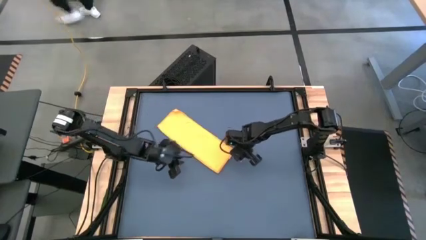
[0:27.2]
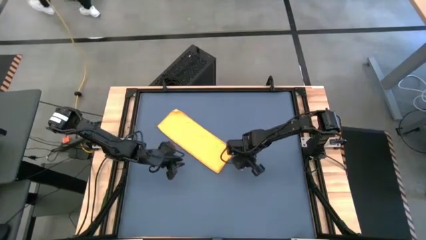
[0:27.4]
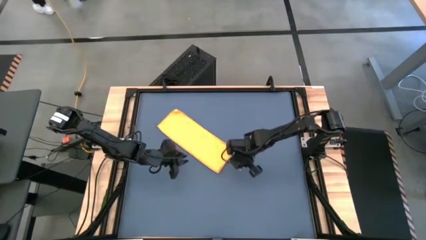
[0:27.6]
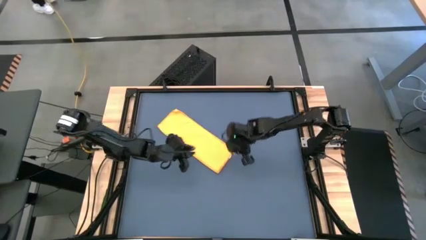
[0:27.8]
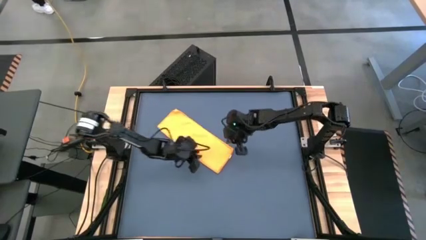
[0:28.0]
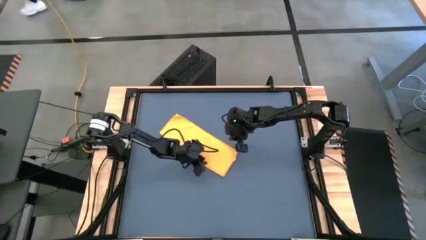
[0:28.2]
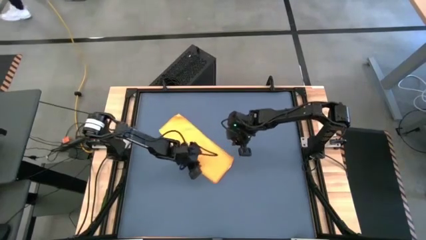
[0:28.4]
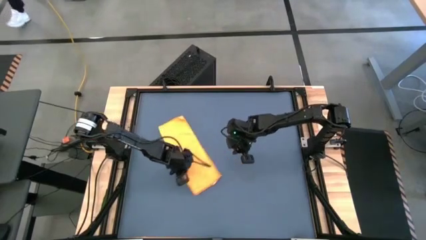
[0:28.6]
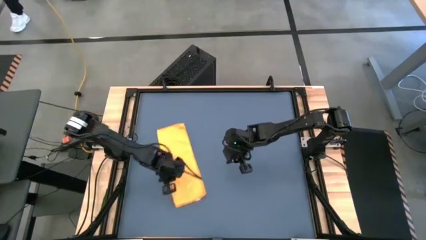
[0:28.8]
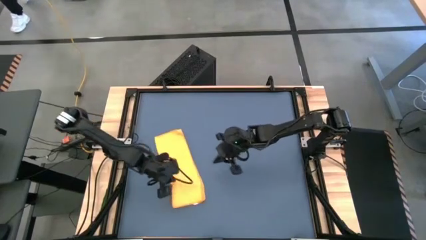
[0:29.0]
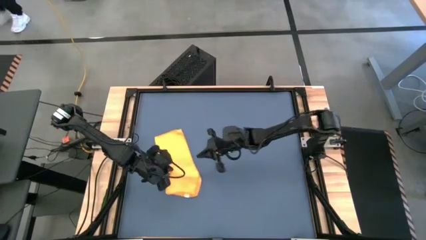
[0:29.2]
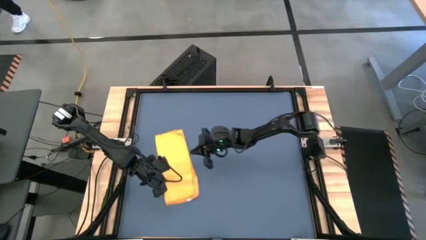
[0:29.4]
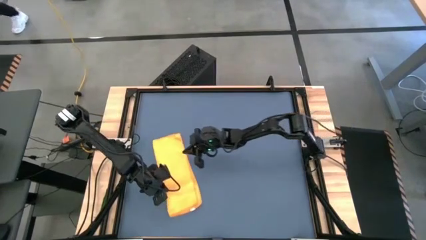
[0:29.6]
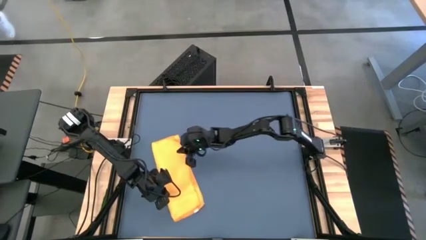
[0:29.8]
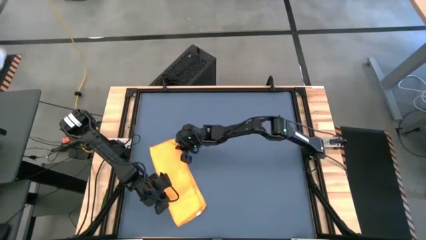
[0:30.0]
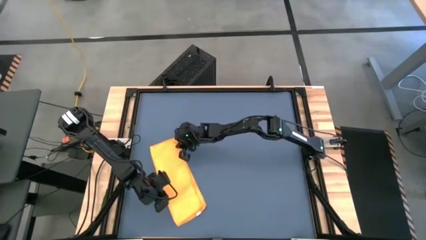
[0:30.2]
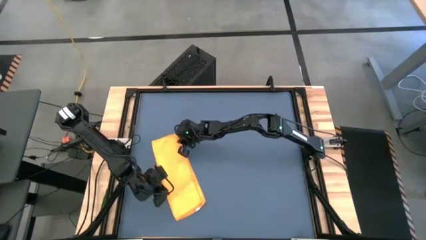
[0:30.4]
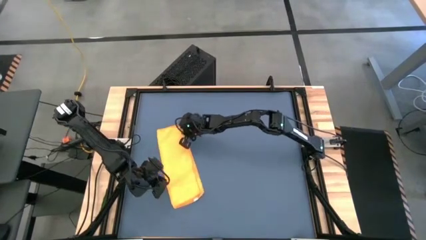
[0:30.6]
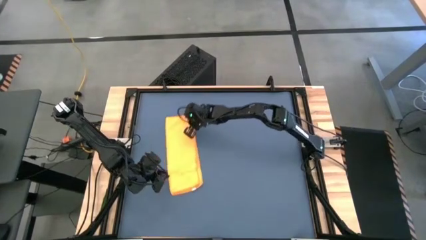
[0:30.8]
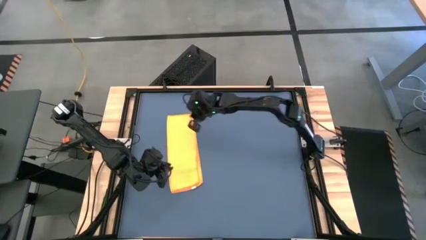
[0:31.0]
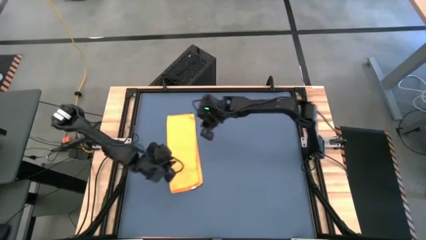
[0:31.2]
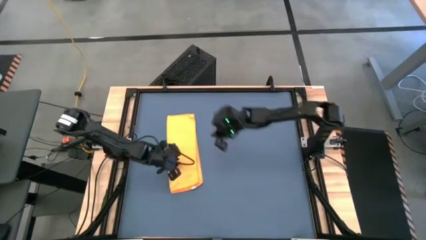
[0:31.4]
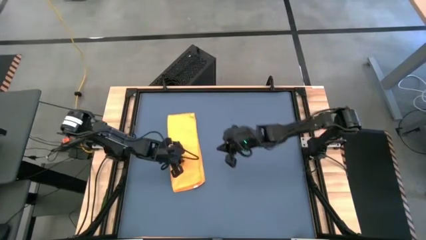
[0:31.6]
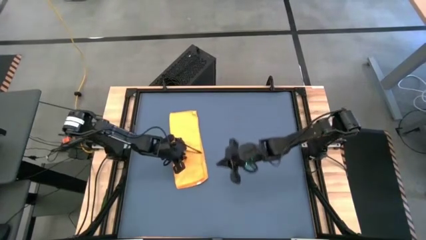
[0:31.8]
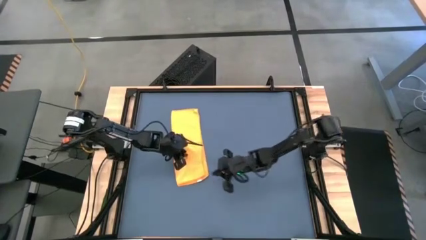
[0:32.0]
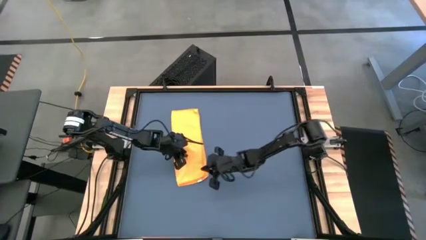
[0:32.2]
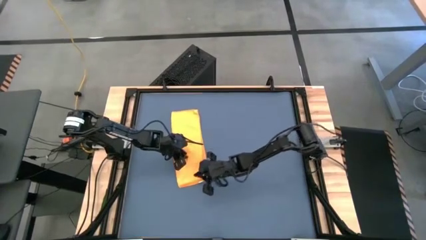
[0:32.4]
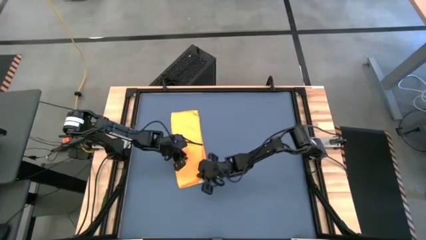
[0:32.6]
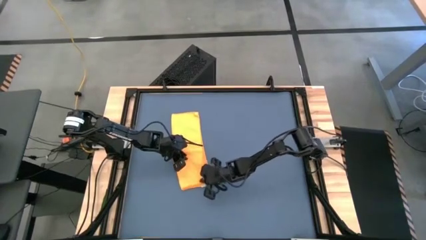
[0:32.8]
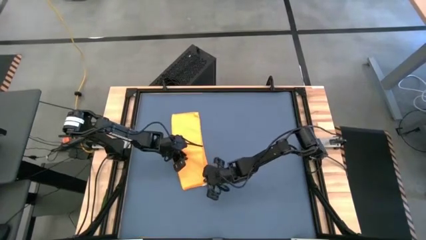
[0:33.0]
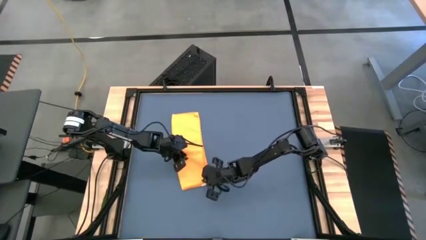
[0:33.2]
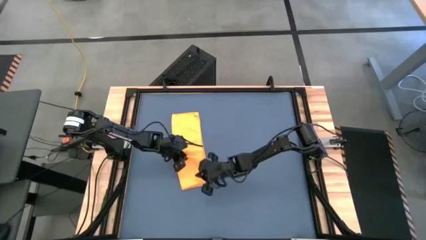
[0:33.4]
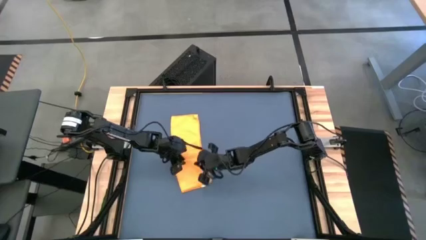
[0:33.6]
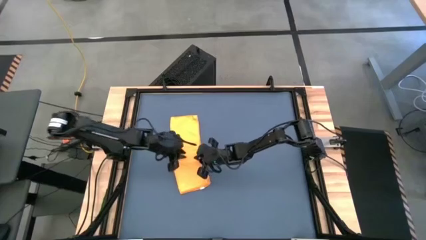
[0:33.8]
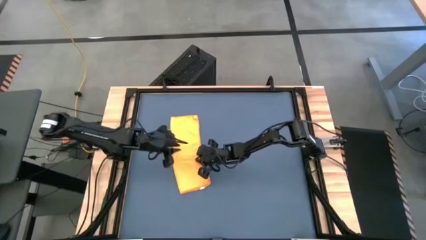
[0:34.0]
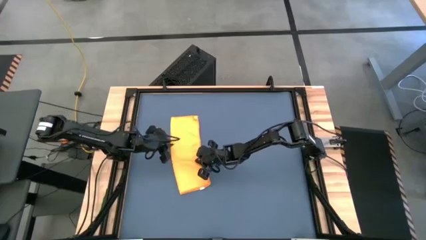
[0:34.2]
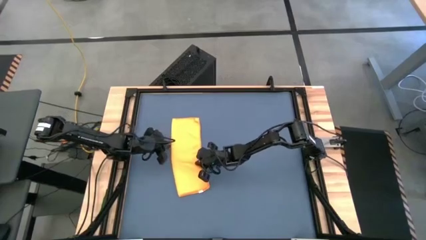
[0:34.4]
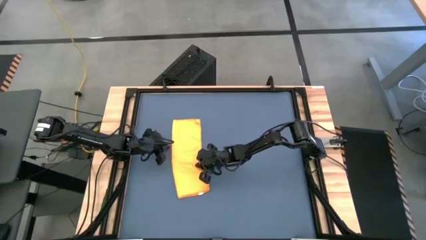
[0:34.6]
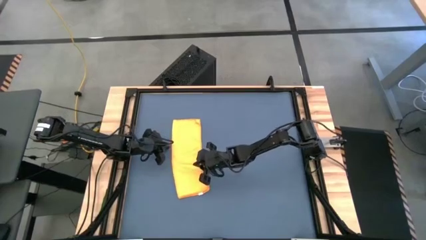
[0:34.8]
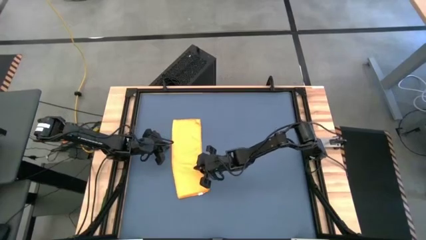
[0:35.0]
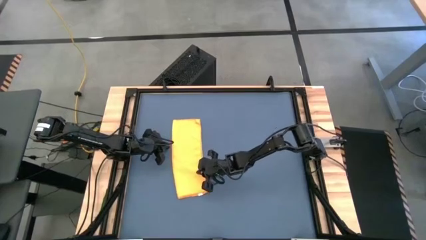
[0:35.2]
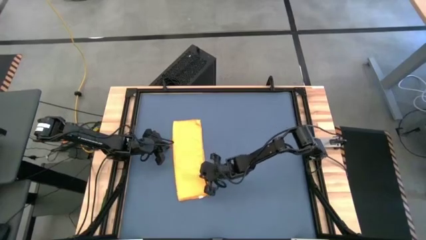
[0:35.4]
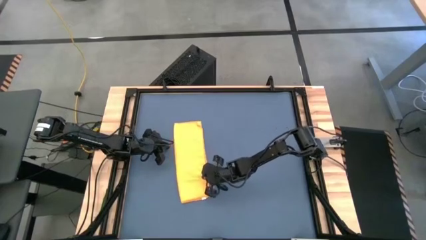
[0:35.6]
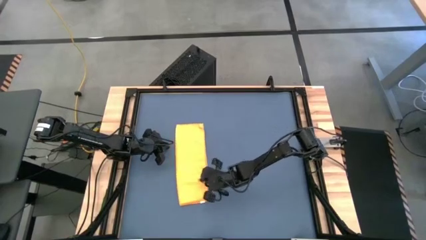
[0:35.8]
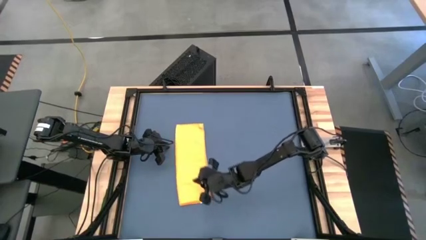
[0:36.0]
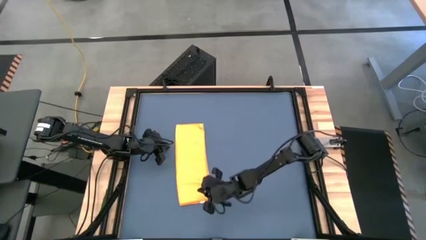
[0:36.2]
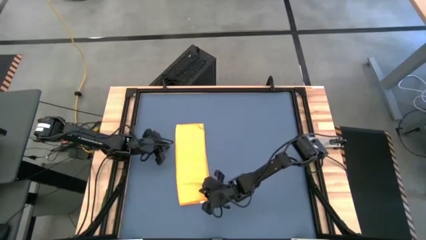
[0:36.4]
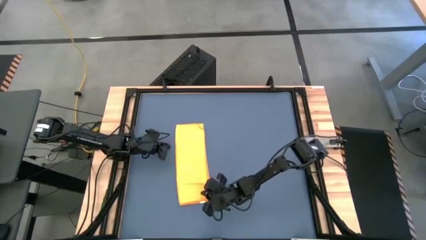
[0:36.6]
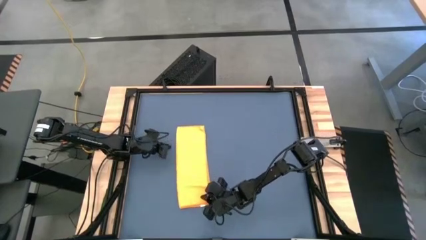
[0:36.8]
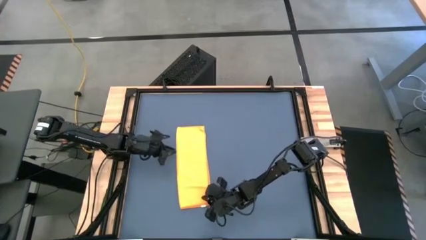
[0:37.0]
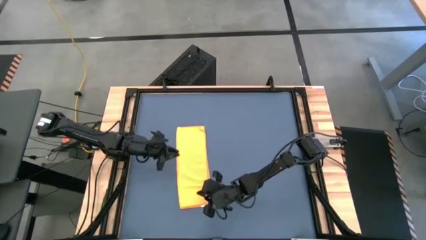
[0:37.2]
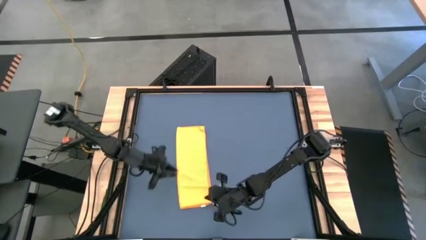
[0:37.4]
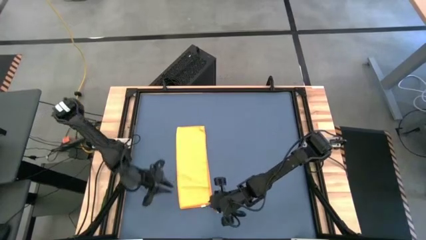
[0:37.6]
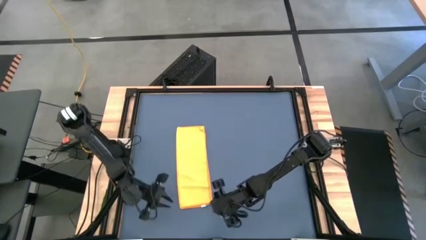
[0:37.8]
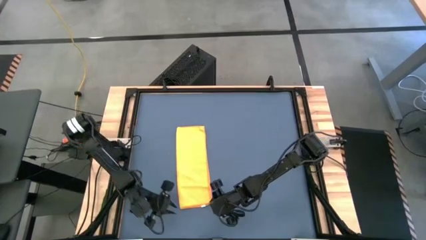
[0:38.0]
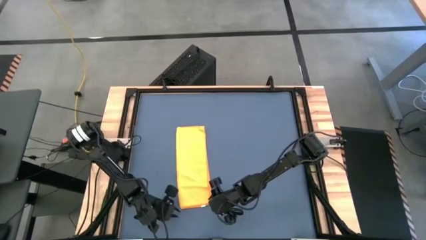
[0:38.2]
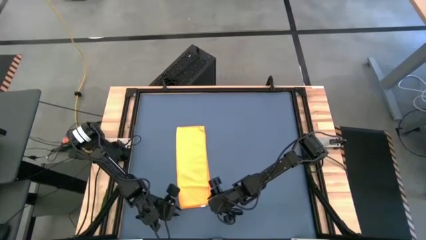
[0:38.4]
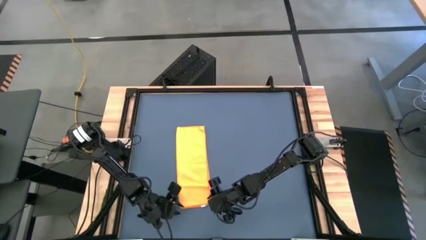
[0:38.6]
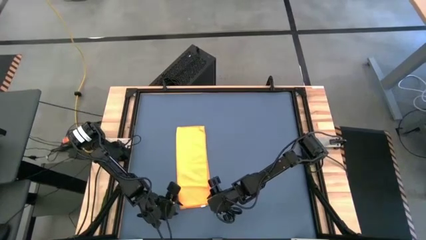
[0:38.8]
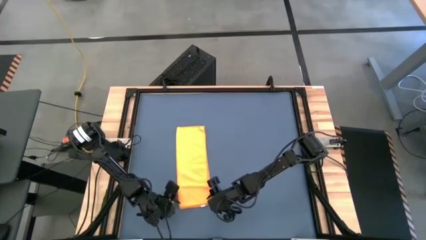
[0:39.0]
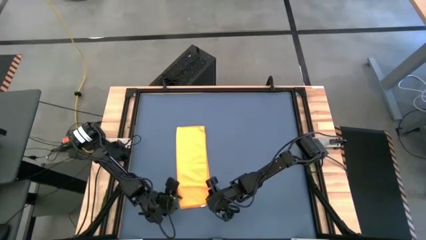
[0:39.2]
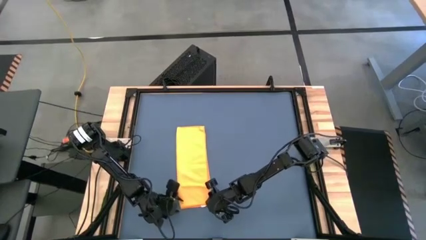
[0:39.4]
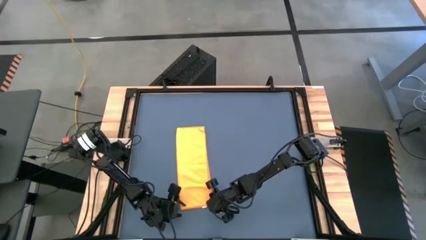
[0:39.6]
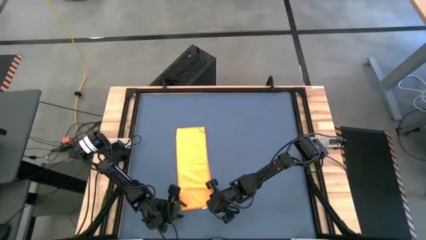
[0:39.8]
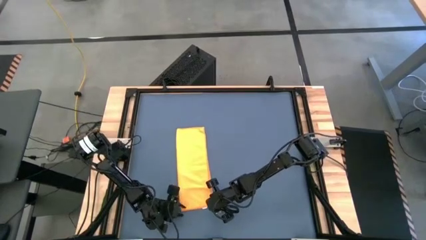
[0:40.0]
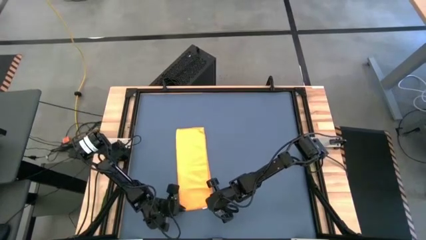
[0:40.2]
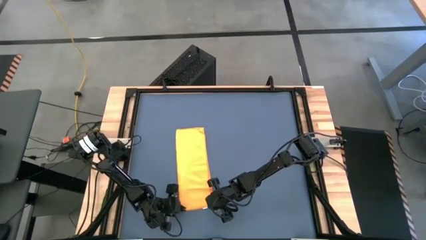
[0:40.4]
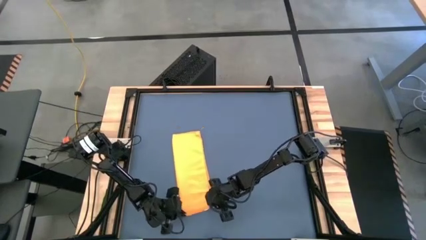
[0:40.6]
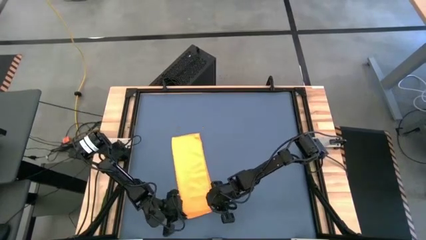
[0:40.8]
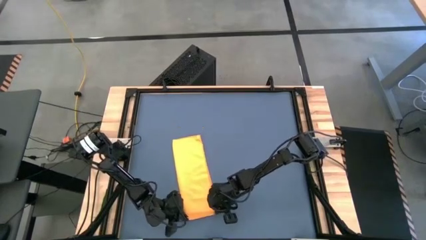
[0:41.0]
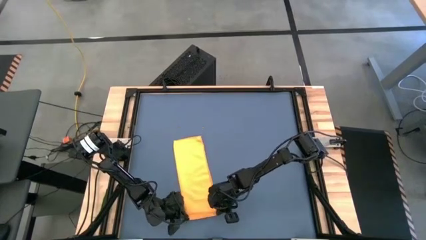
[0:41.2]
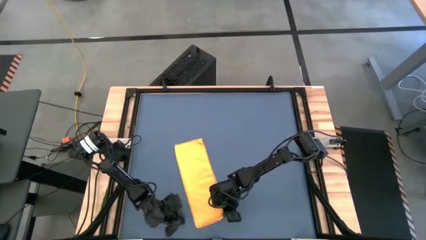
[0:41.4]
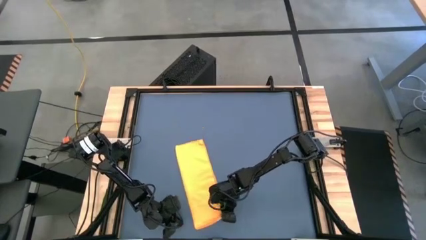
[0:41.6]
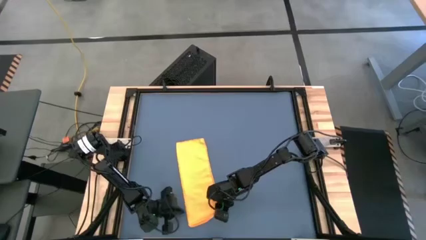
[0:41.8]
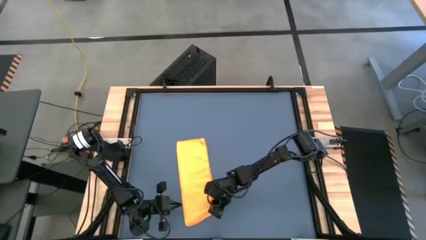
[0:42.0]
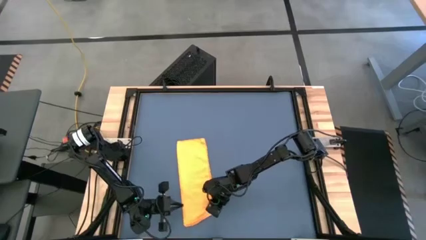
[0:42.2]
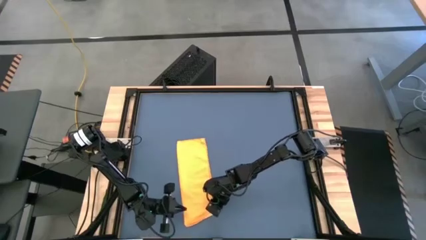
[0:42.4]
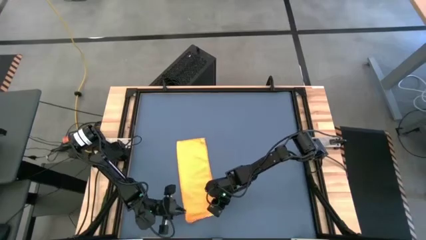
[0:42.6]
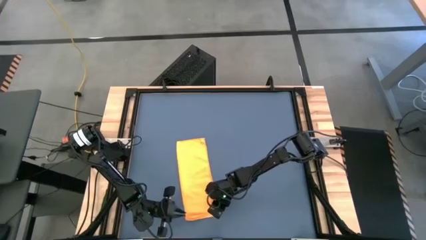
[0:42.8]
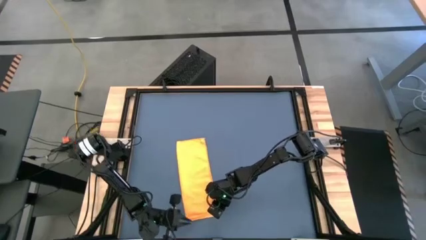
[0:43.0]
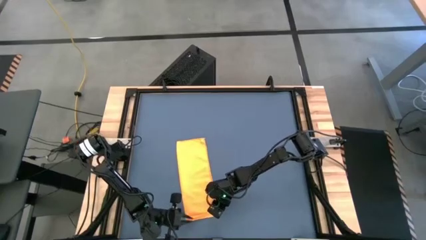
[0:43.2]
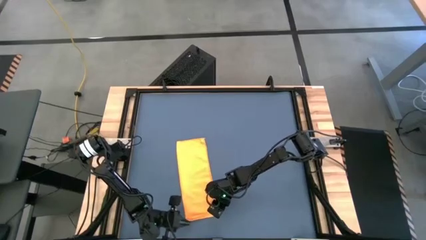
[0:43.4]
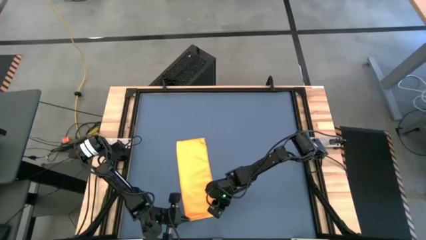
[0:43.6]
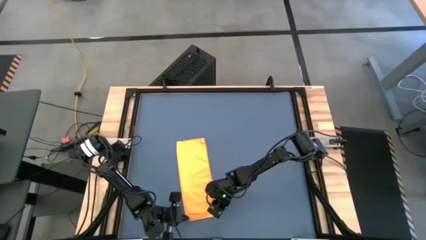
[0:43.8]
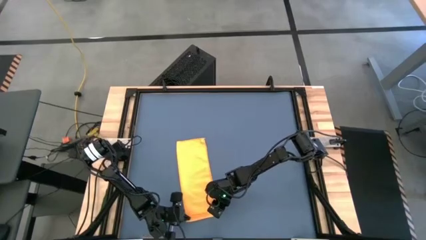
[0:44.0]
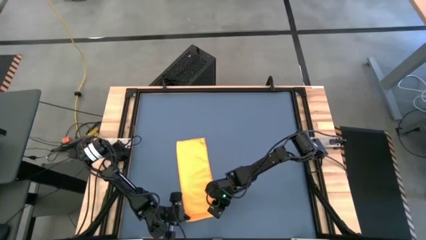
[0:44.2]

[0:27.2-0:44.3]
Task: Roll towel
Roll the yellow towel
